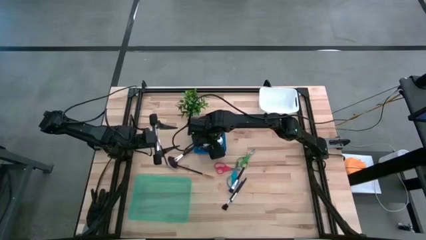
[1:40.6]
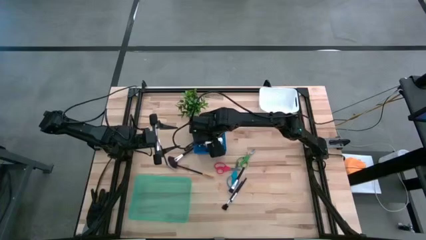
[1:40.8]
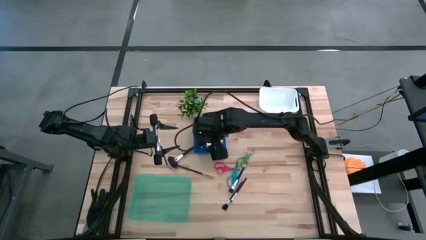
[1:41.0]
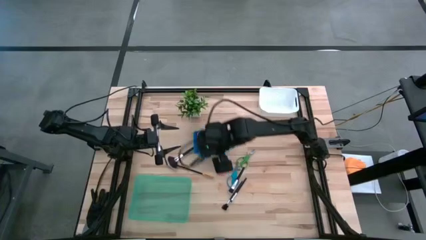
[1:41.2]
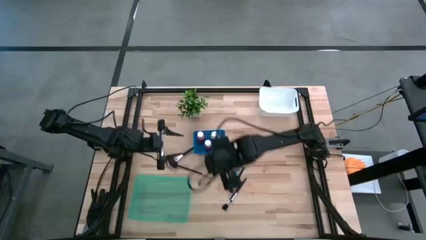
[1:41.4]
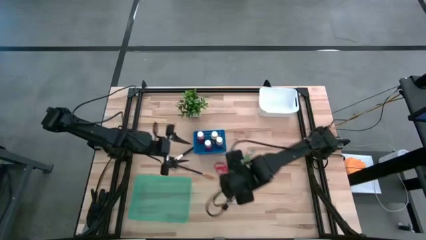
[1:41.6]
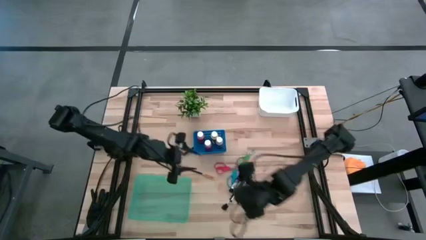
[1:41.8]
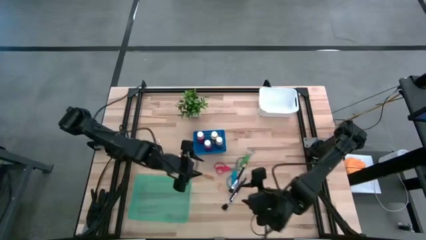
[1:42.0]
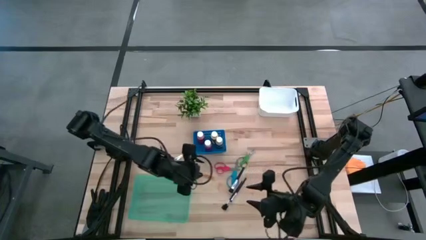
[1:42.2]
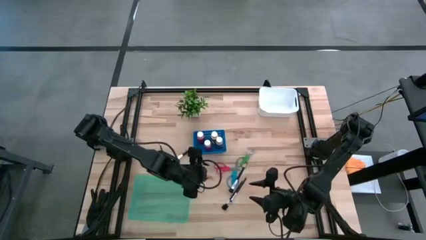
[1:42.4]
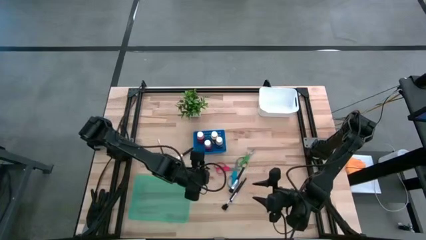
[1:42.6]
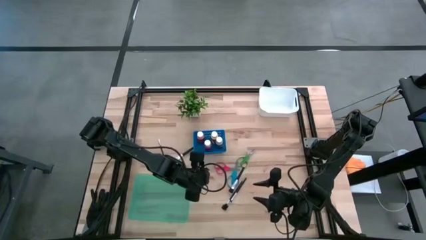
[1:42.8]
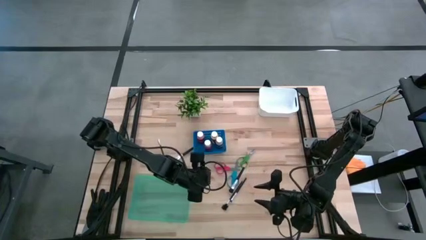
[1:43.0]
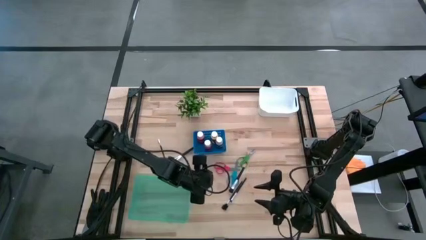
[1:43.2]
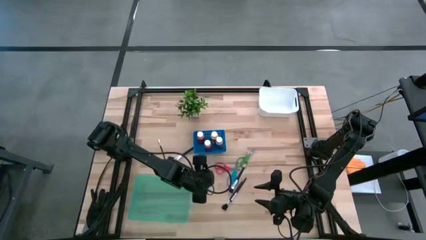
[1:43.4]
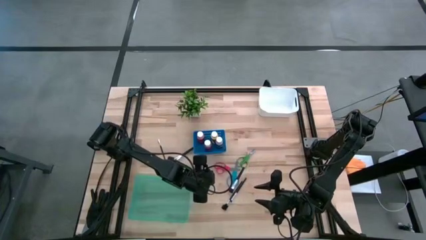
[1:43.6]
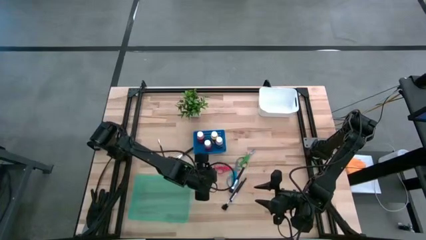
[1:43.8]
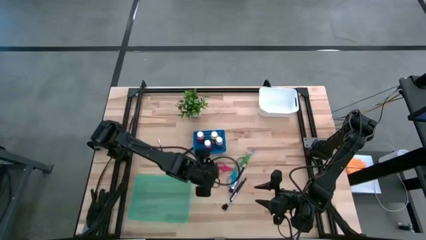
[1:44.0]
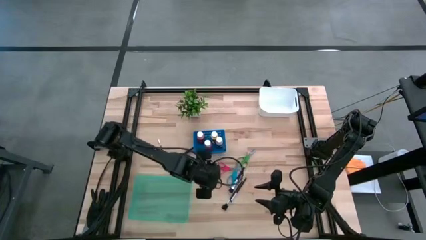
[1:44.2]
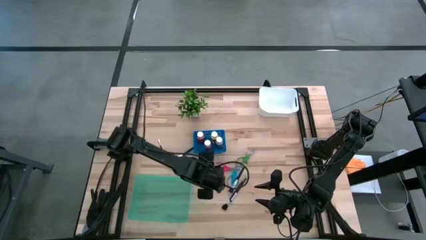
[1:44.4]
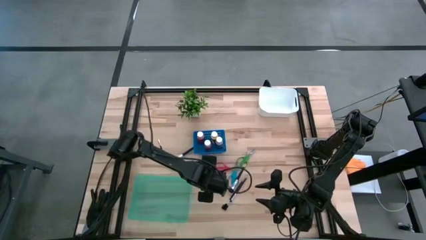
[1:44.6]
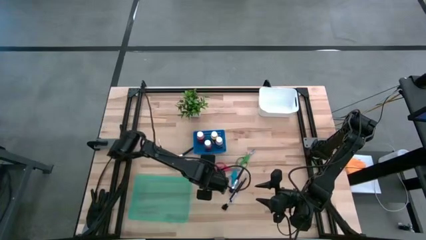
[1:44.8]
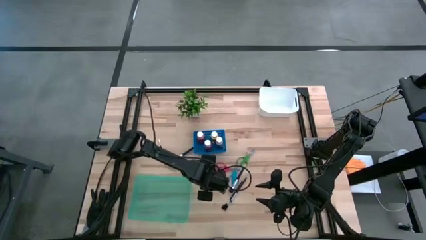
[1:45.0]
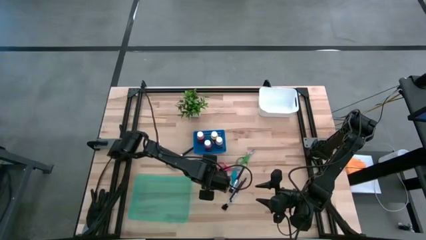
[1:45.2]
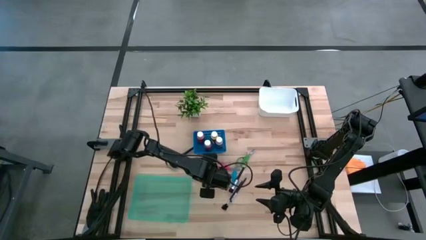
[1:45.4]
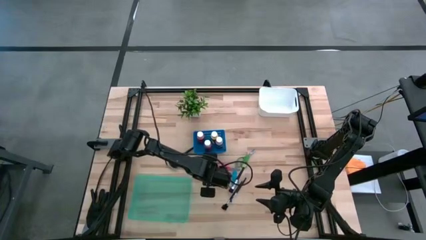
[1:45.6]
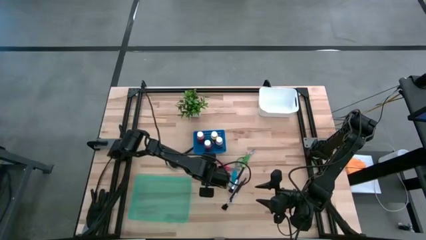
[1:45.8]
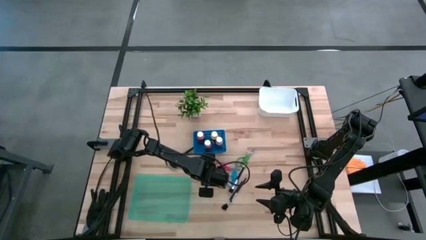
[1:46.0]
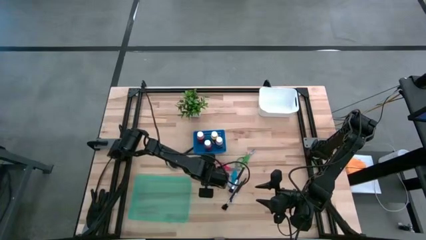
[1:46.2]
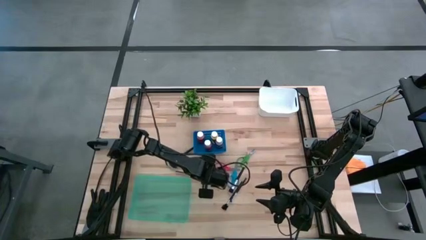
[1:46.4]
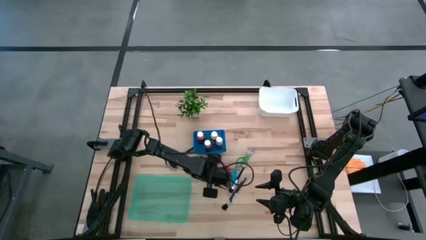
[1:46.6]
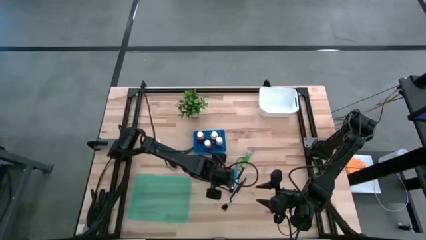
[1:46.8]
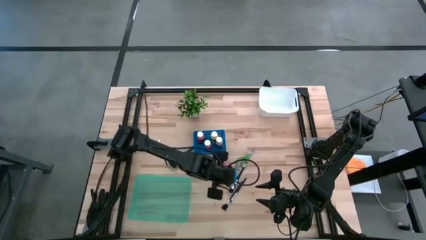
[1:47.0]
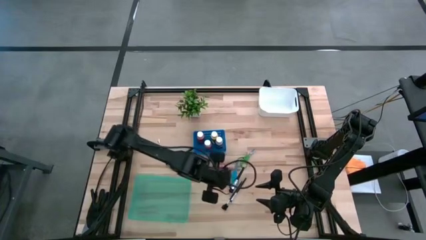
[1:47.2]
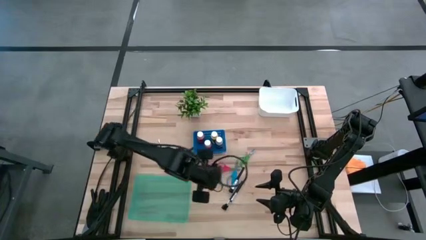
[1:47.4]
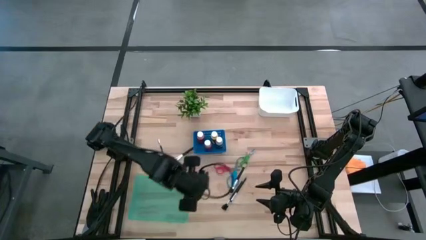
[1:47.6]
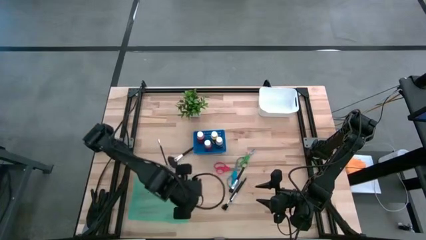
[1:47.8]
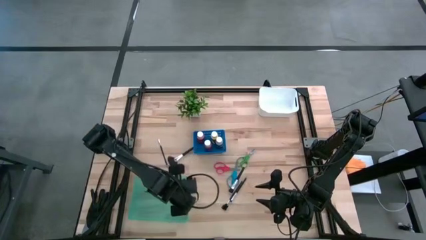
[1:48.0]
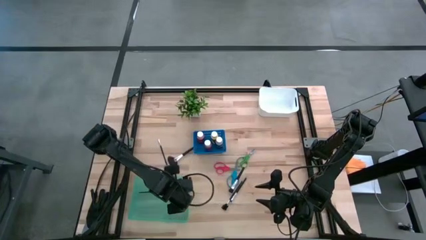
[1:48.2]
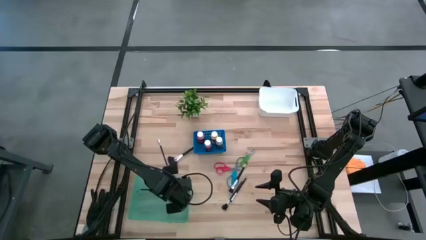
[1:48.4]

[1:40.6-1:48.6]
Task: Pick & Place Paint Supplies
Put the yellow paint brush into the green bin

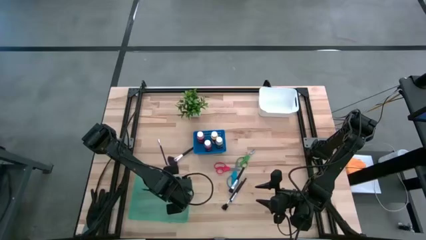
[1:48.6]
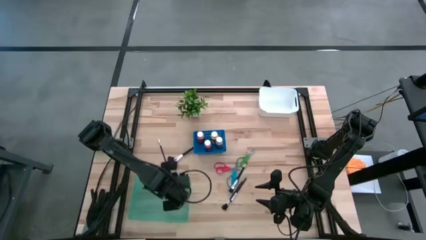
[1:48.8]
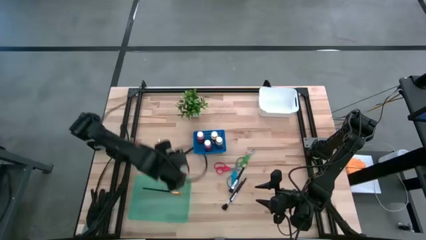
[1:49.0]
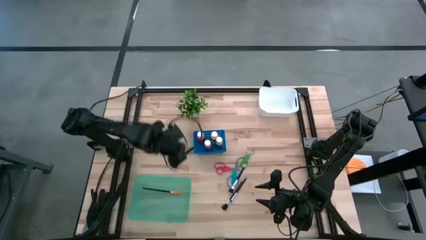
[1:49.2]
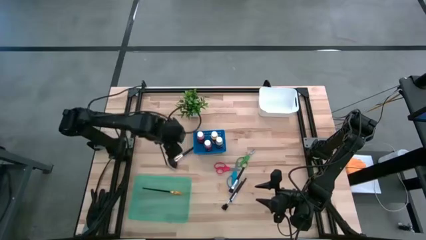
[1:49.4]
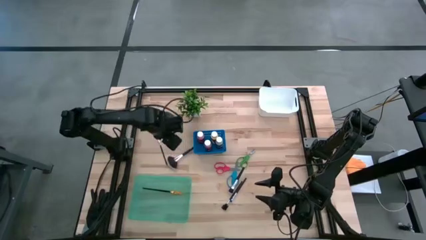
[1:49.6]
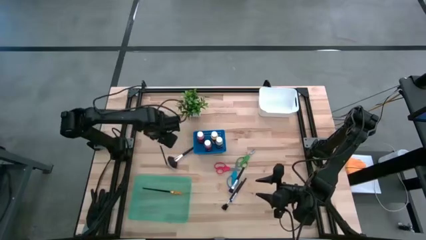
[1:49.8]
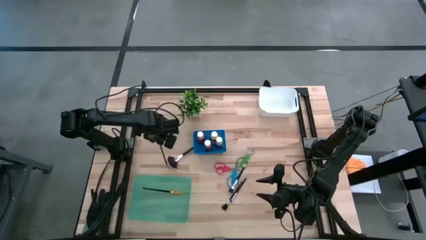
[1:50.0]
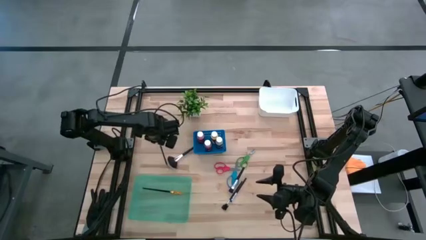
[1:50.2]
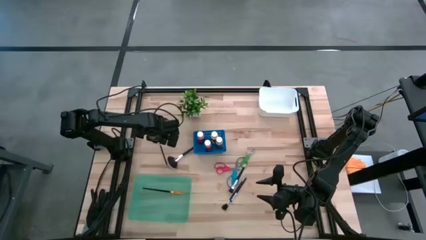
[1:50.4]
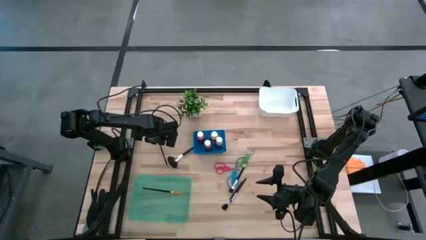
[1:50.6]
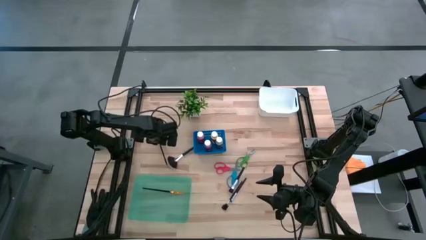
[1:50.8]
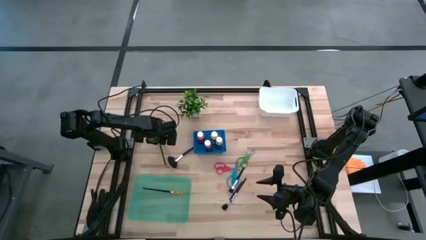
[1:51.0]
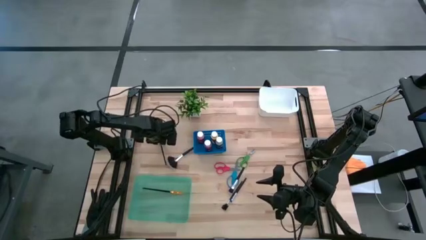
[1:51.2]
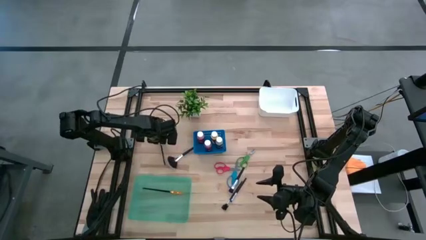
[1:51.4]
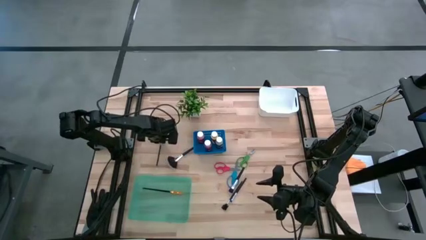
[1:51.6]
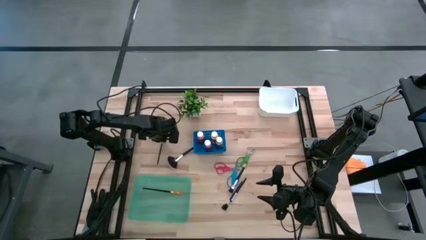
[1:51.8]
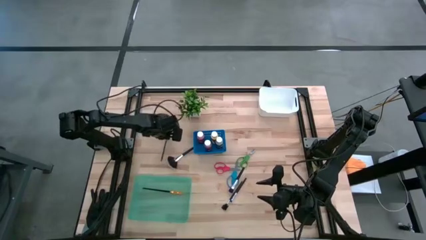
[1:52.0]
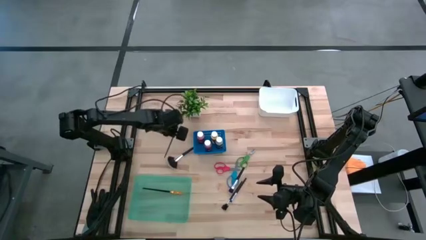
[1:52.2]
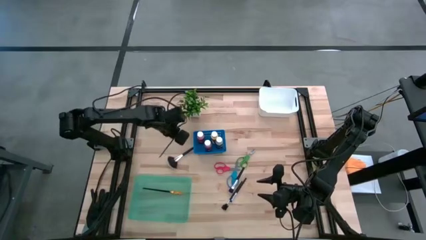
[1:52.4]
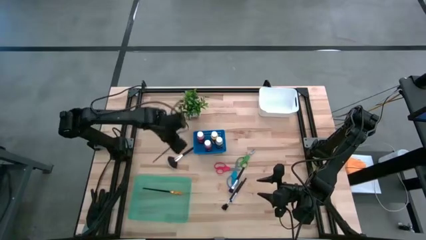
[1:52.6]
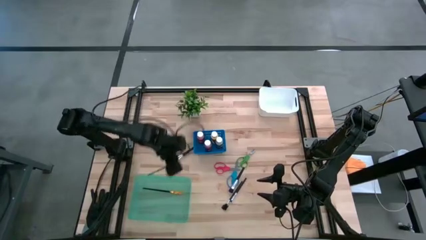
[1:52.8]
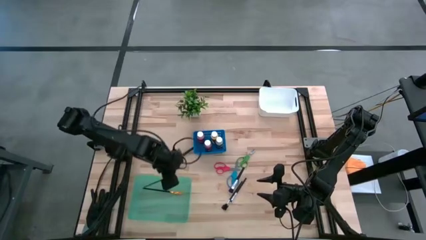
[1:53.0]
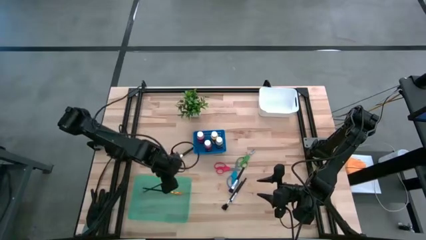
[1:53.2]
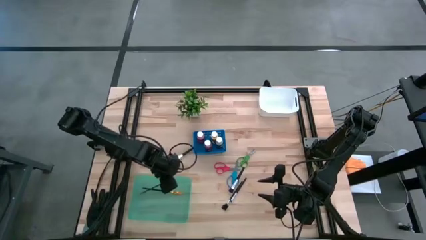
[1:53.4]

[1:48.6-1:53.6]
Put the eyeshadow brush into the green bin

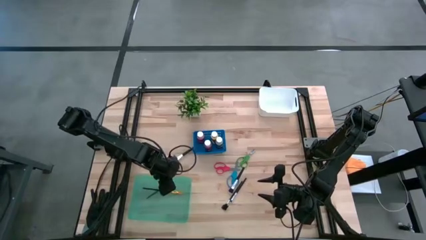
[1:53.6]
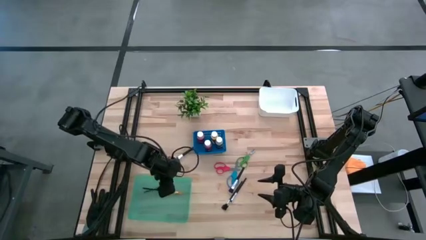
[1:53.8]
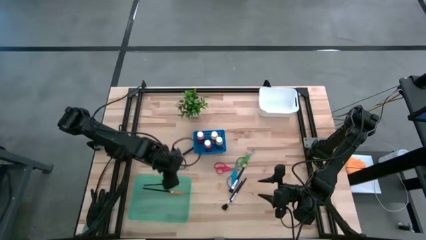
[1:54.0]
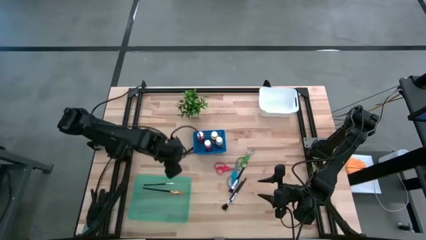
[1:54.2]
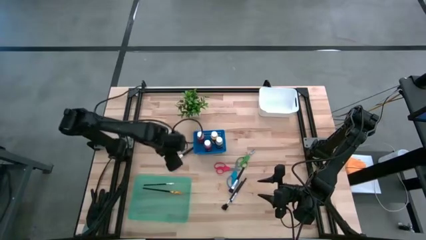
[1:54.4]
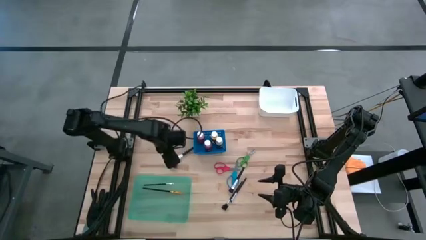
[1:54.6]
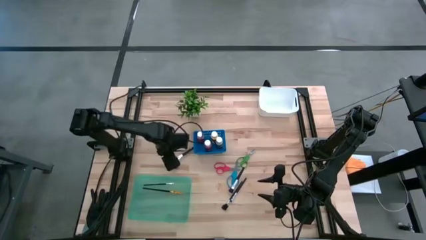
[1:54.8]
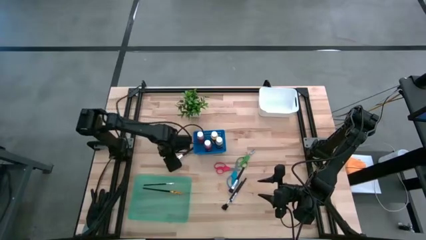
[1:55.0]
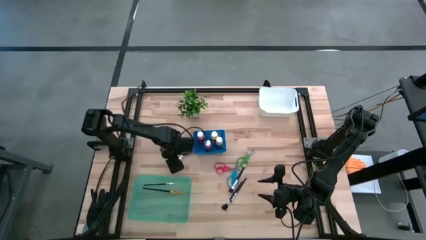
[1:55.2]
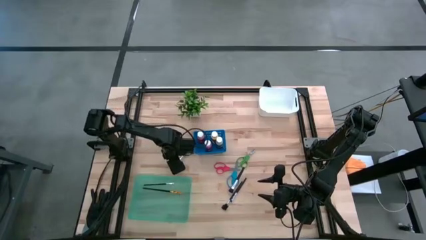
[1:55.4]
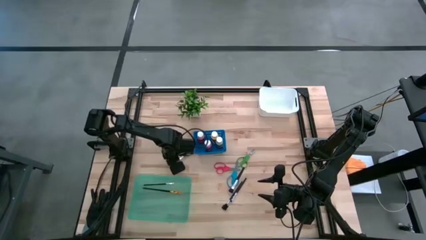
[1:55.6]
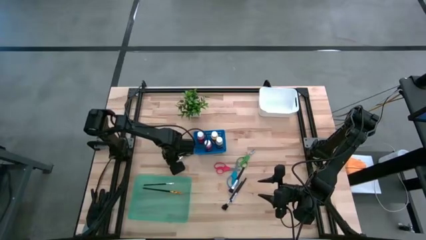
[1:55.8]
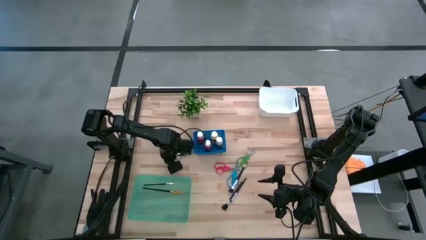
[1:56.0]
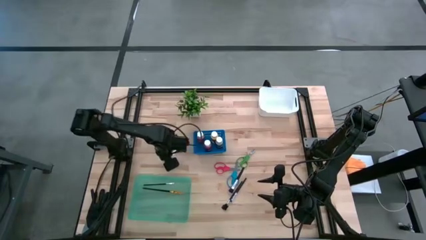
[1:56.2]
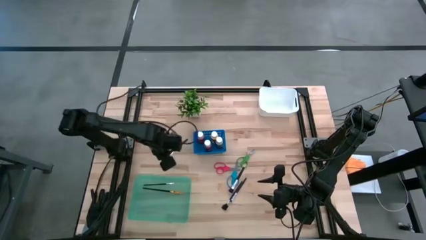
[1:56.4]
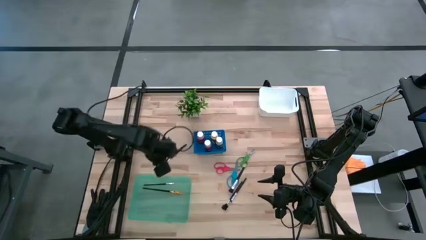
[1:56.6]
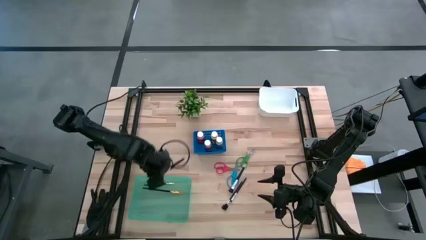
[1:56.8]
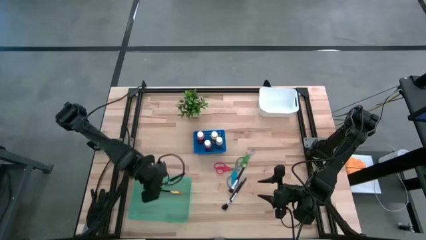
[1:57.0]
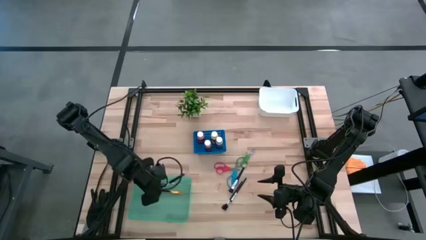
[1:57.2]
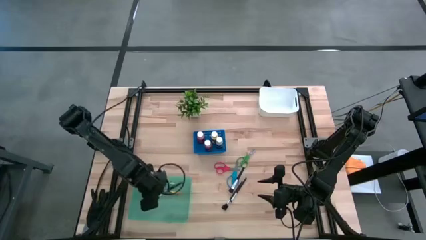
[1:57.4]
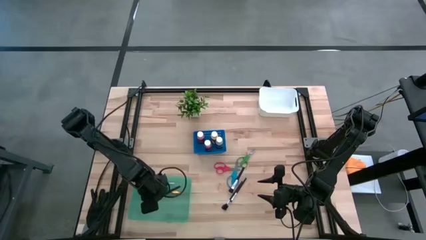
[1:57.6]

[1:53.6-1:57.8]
Put the highlighter brush into the green bin
